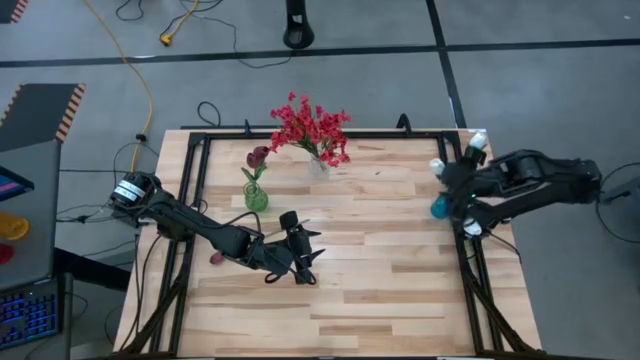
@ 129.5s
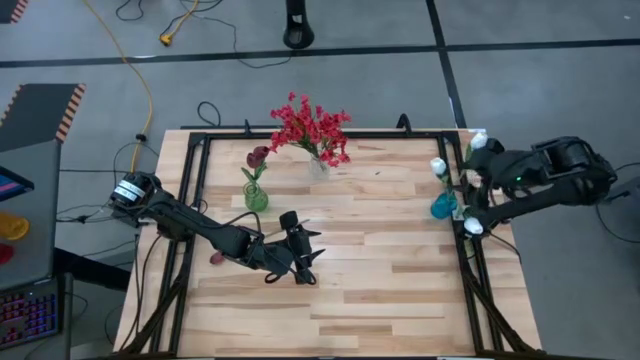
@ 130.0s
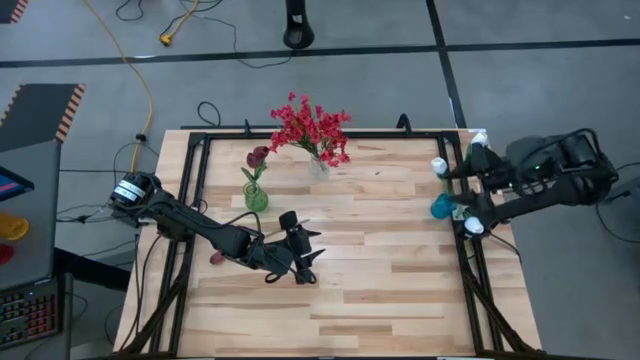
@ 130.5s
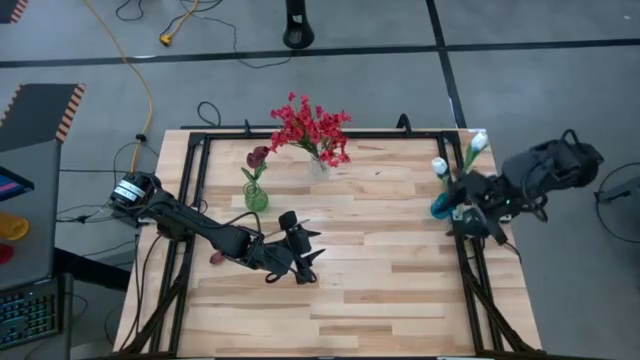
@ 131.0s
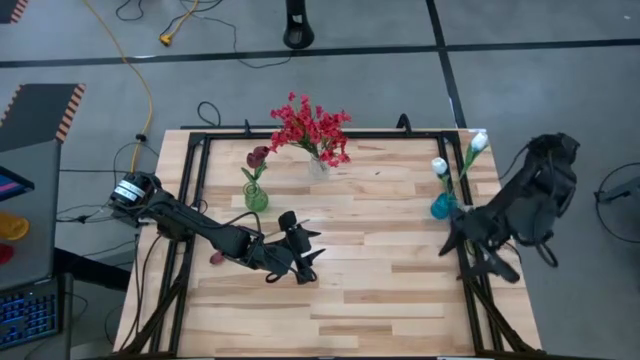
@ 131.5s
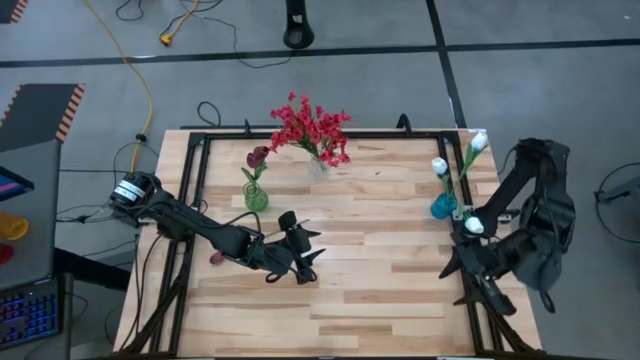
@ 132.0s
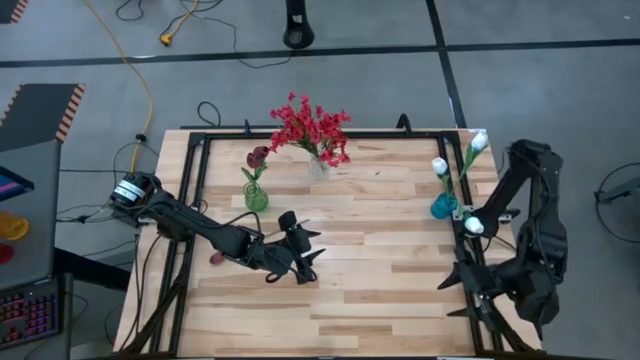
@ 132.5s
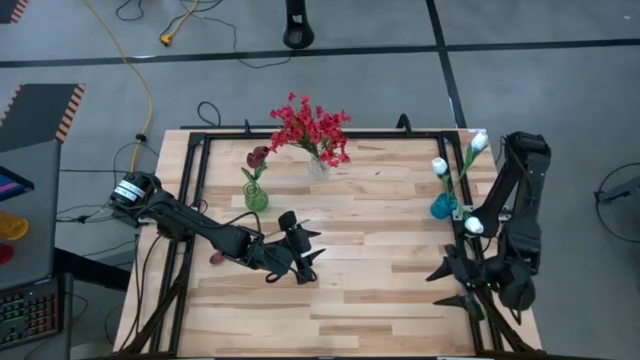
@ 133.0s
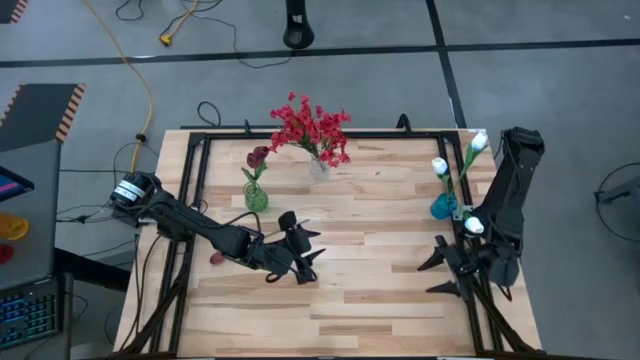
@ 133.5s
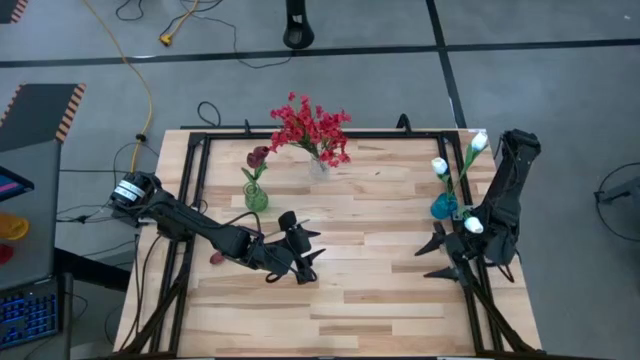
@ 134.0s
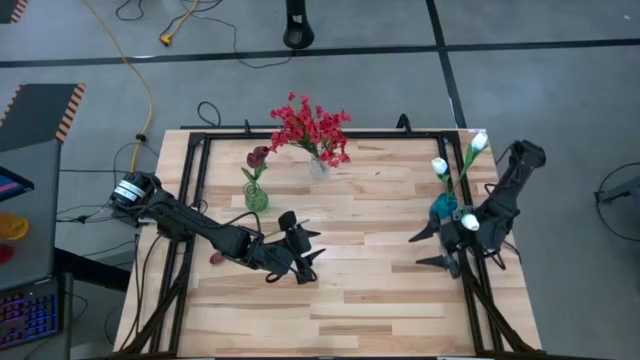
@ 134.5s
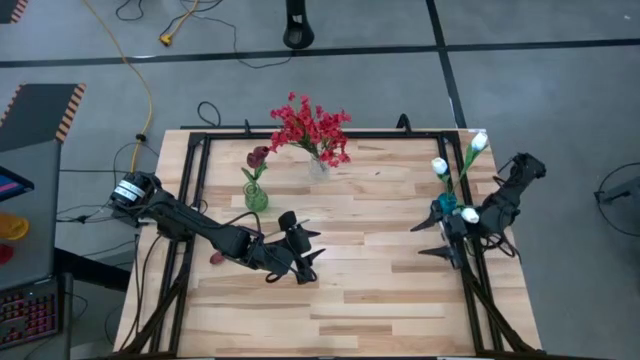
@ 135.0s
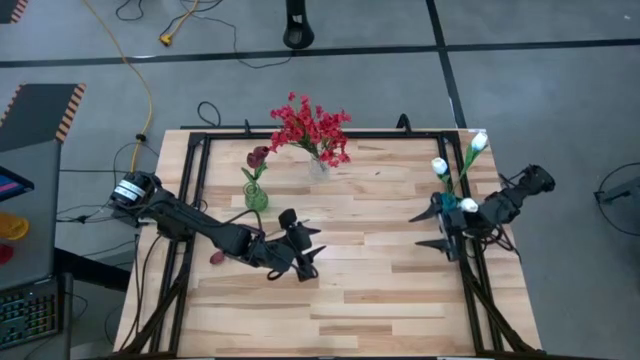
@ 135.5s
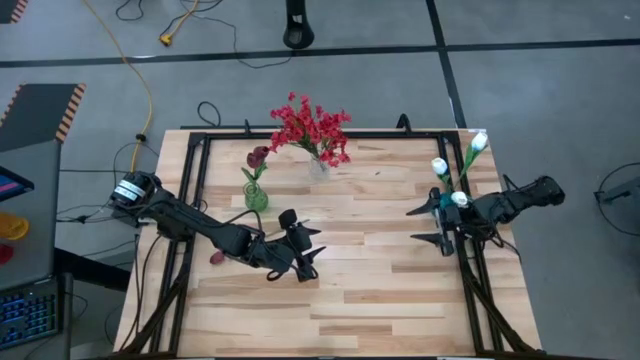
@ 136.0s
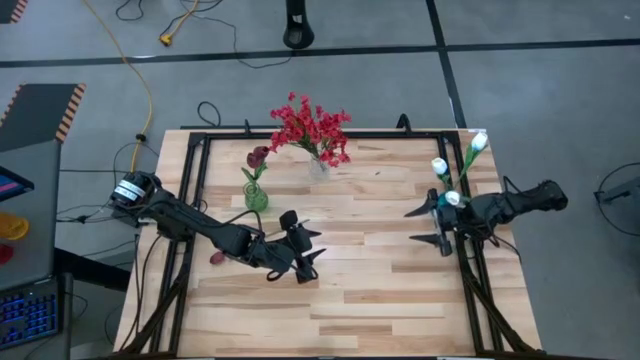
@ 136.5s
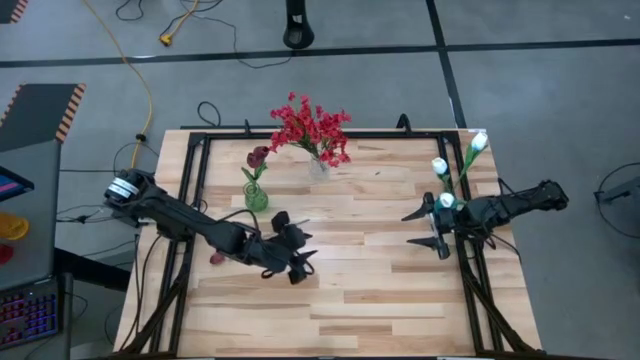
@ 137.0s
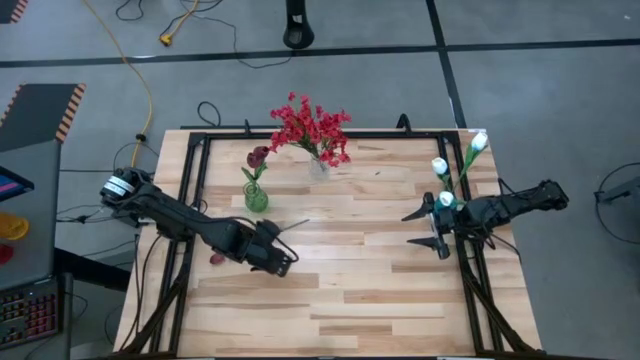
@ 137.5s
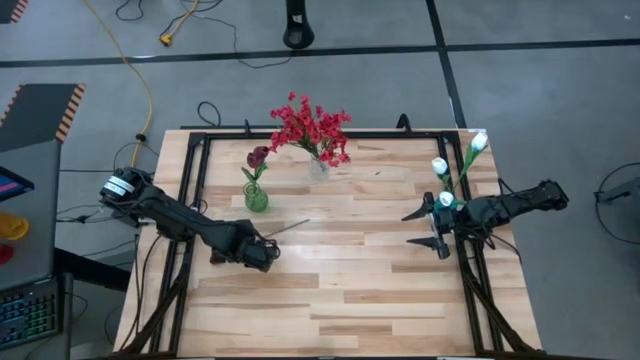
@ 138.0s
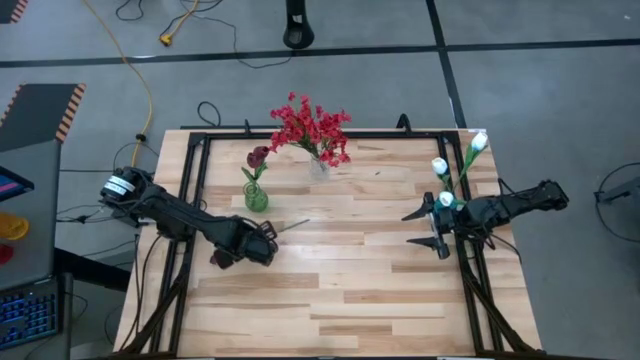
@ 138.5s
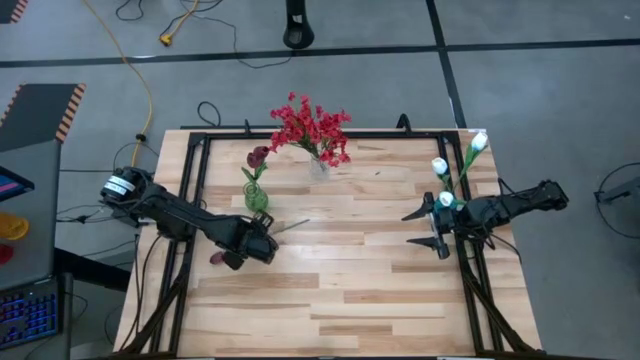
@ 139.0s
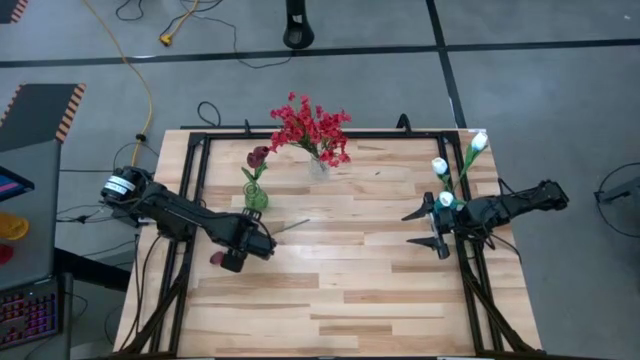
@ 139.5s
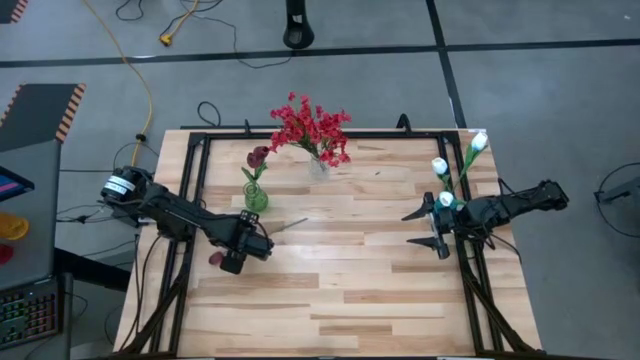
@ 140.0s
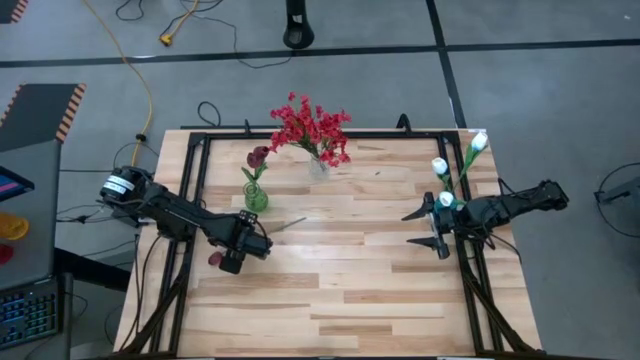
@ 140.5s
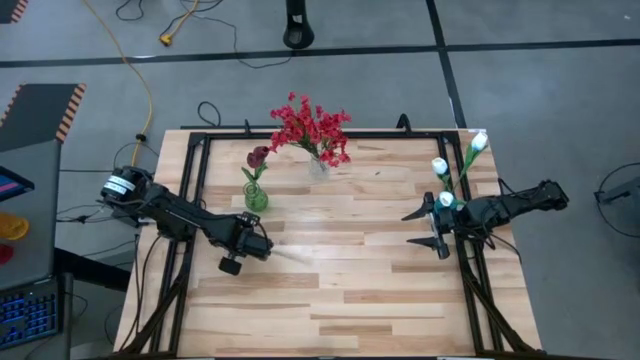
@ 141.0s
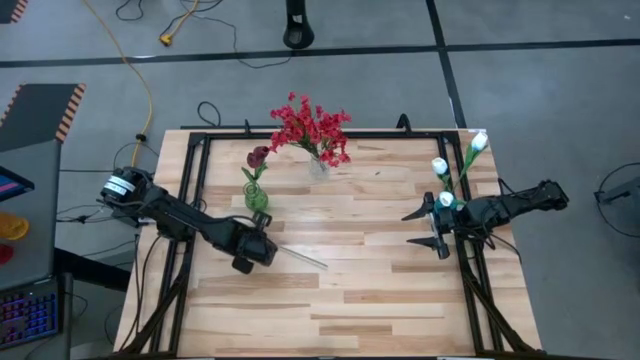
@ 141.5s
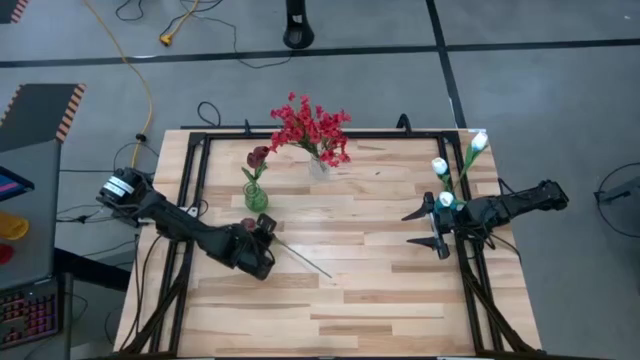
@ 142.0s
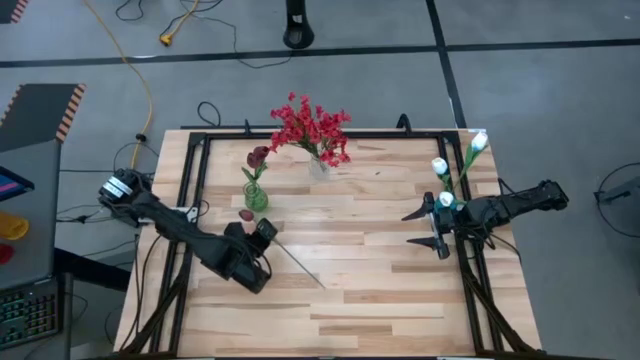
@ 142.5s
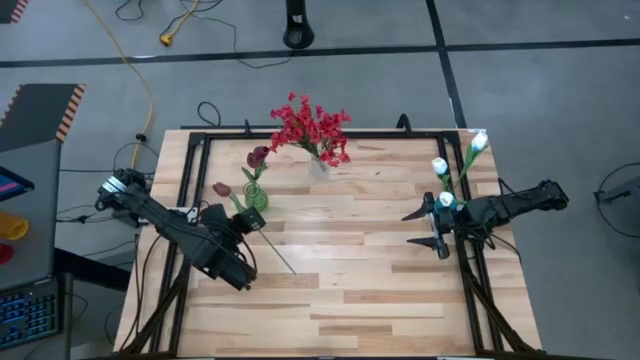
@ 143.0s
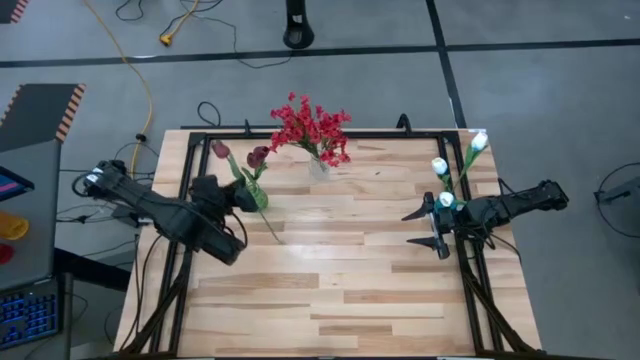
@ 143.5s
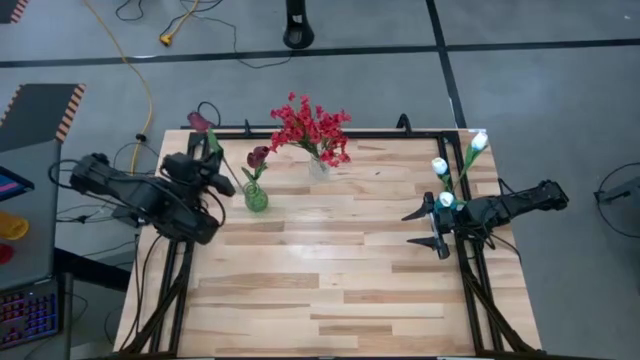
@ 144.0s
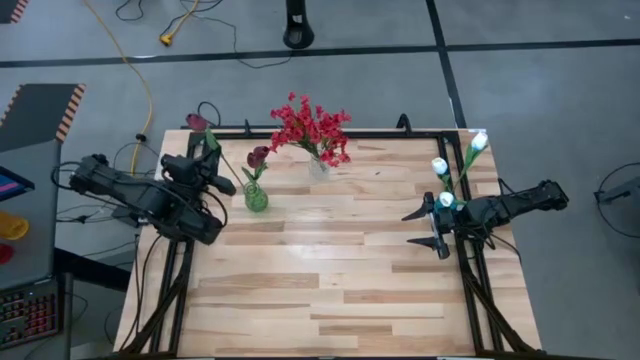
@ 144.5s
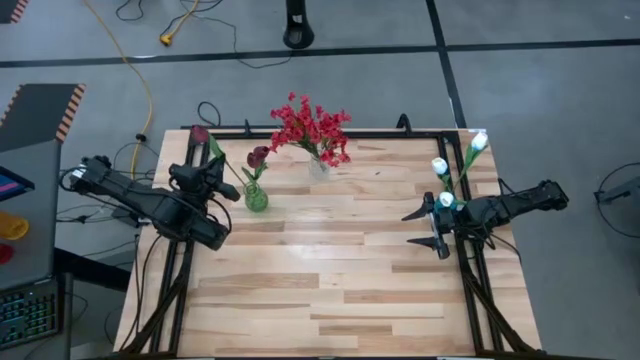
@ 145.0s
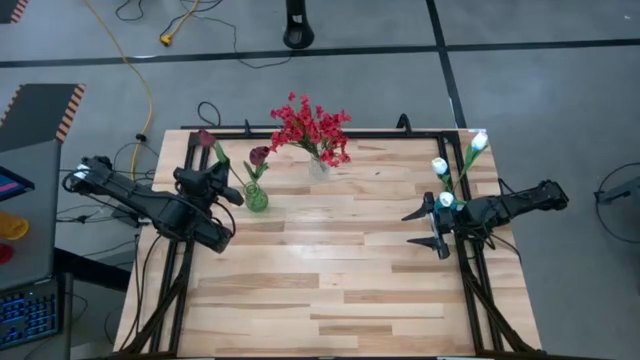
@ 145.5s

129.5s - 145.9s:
Task: Sort flowers into vase by color
Put the dark red tulip into the green vase

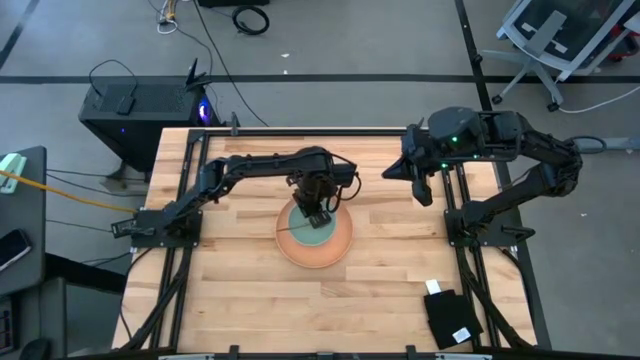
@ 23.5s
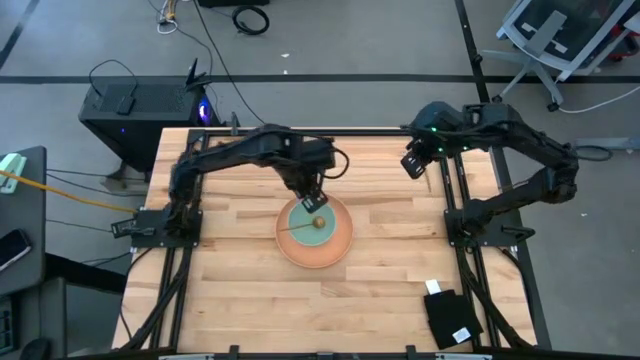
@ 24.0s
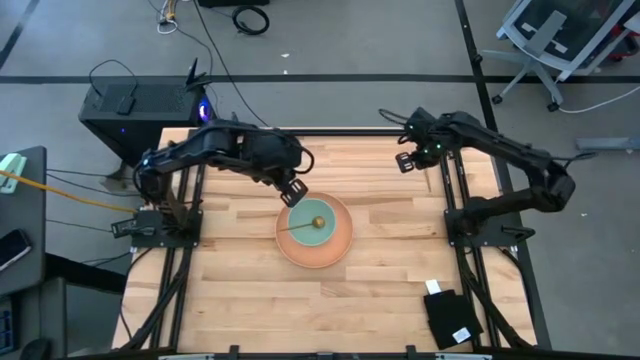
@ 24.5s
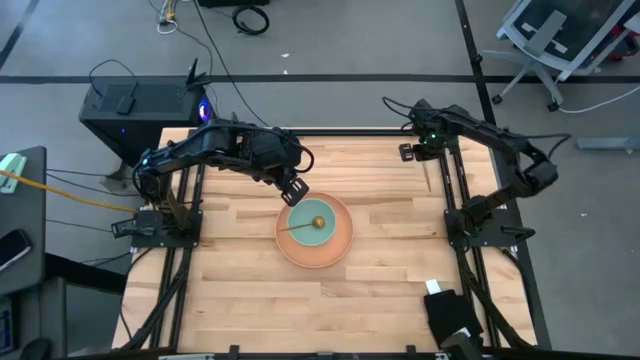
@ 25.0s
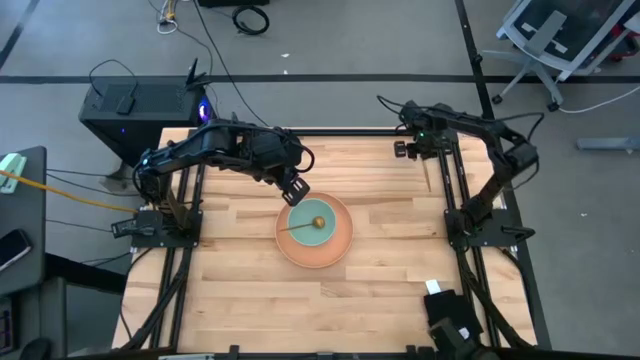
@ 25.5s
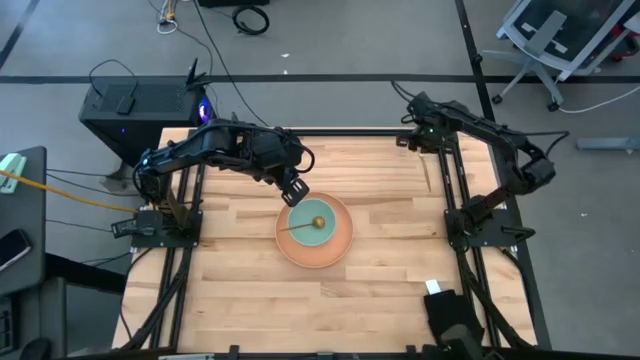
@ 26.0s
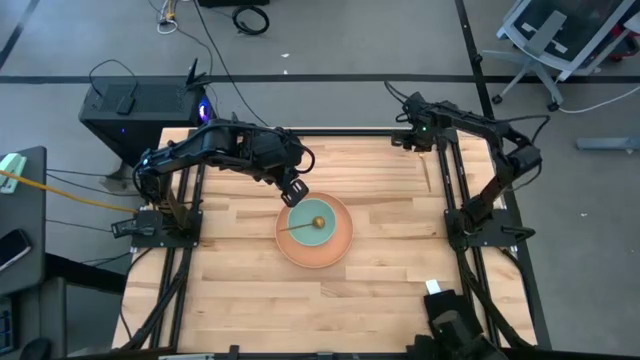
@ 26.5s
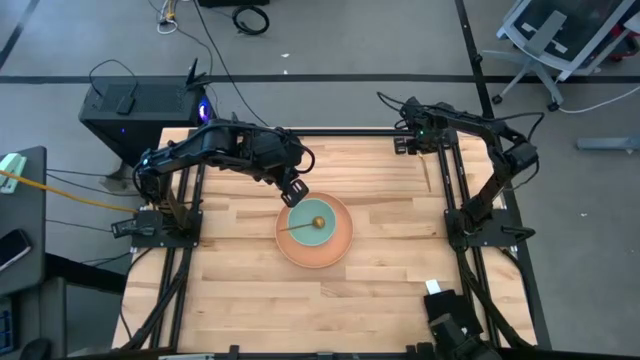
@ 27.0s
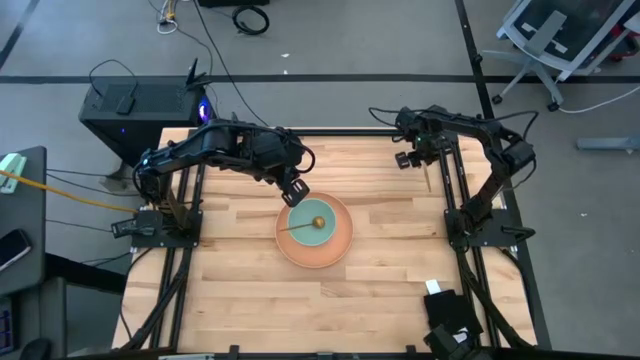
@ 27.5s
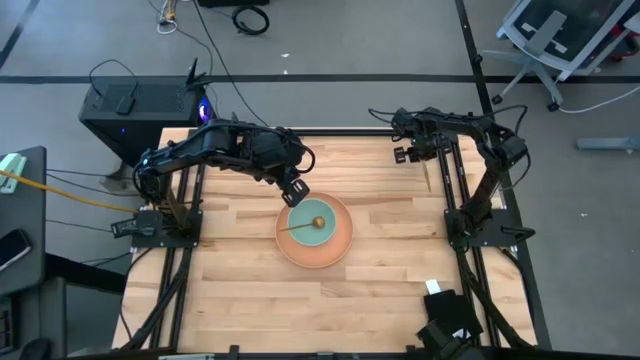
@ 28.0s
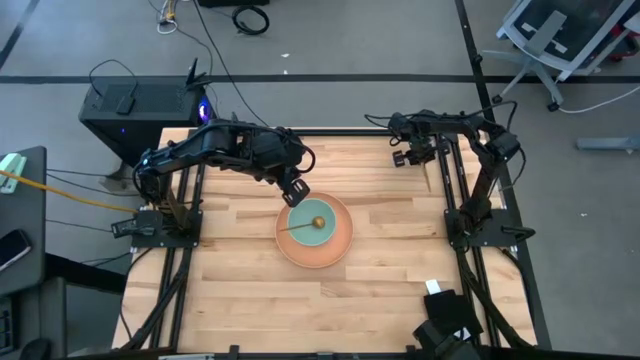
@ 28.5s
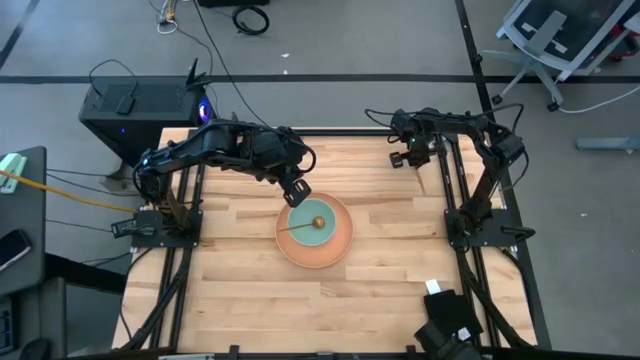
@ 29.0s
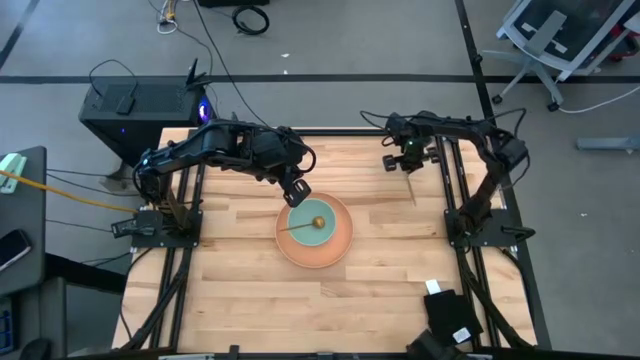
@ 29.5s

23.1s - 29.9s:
Task: Set table place
Put the fork into the center of the table
